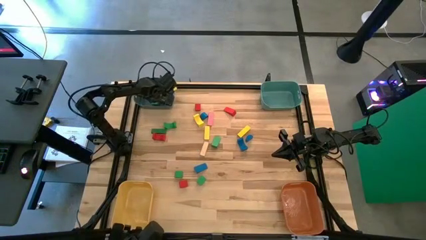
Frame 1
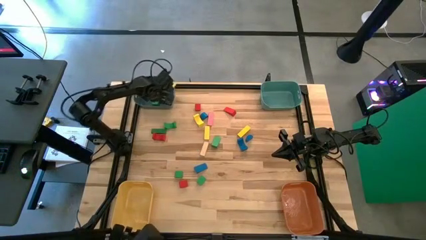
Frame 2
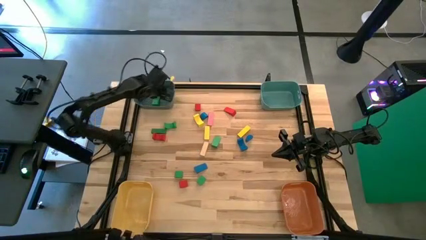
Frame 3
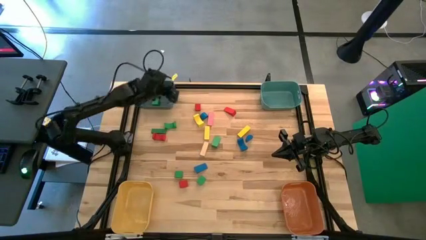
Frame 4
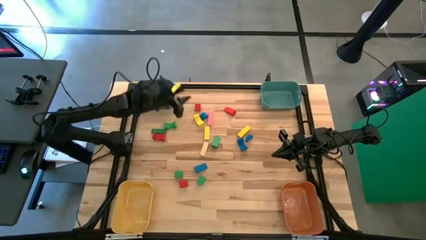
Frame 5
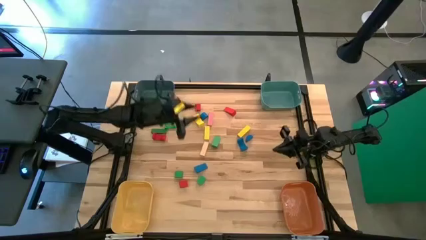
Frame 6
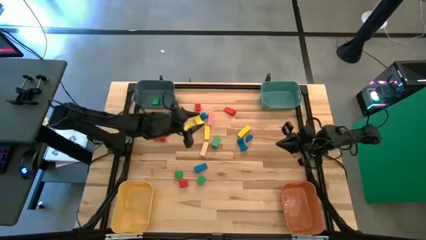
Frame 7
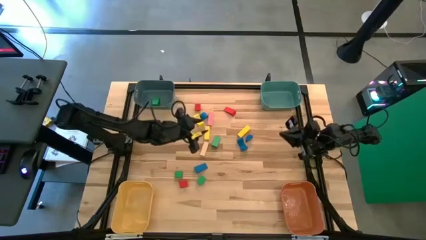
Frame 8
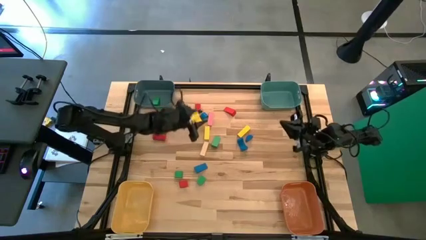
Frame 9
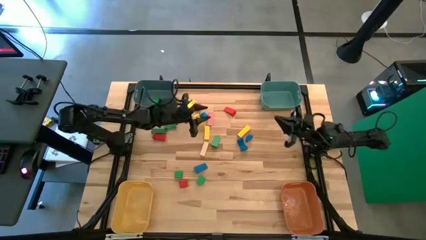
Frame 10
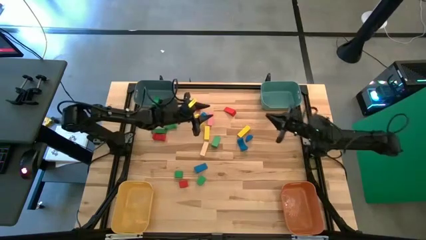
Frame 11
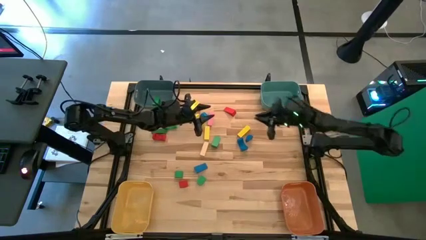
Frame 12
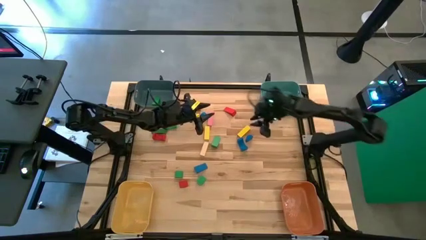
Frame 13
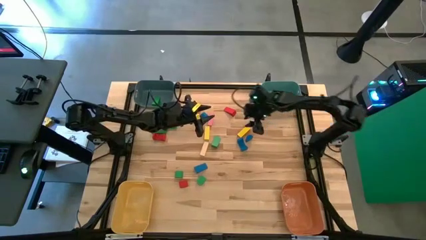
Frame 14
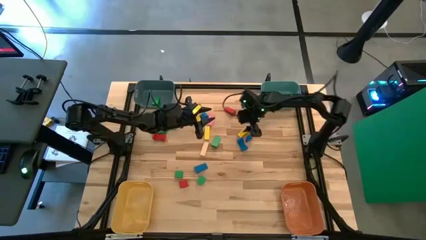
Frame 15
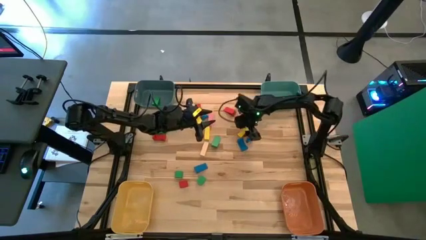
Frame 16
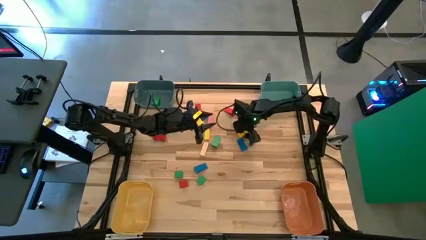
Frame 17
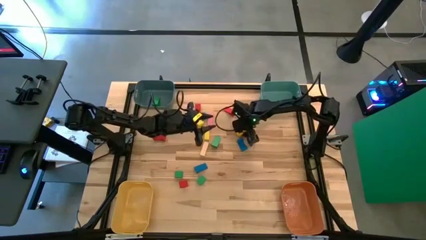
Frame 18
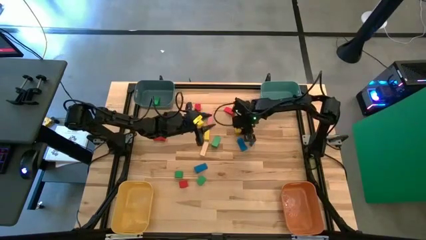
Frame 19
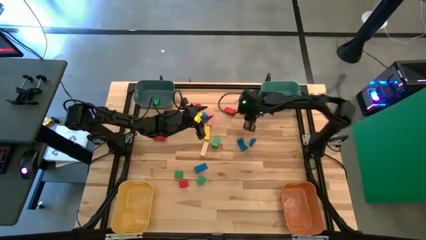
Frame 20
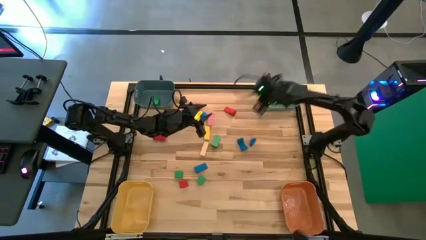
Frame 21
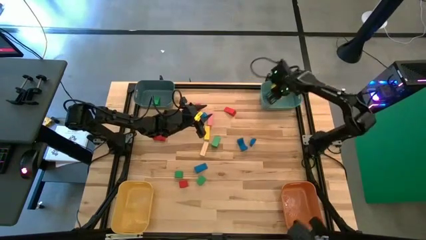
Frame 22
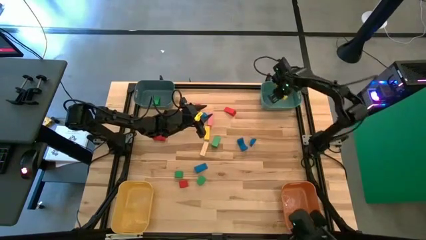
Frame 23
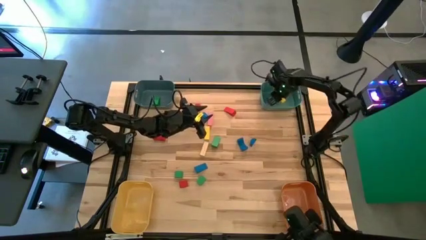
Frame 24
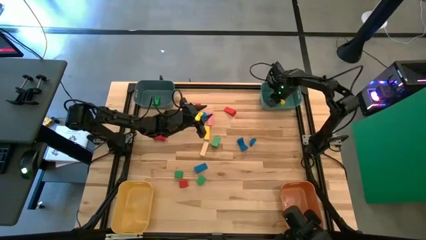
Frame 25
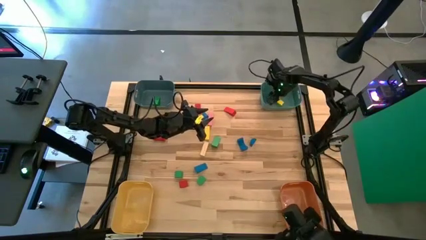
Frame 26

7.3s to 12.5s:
Task: Sort blocks by size
Put the right yellow rectangular block into the green bin

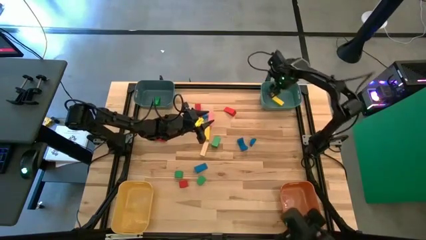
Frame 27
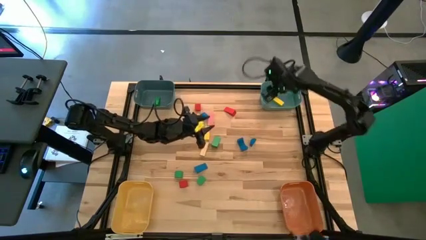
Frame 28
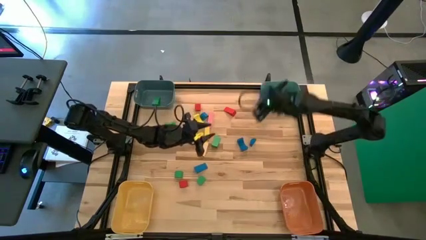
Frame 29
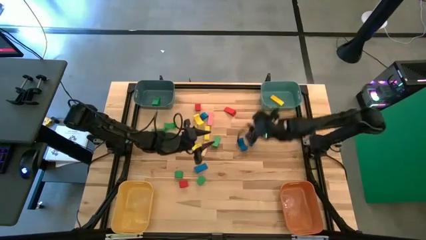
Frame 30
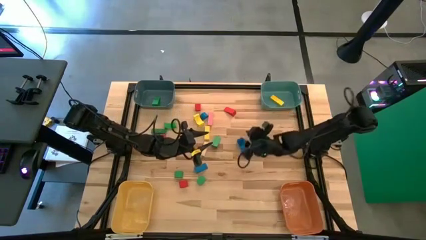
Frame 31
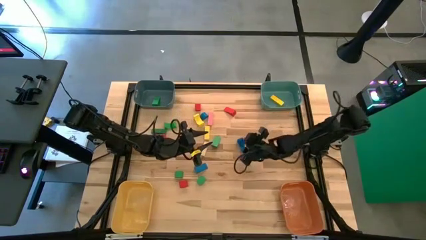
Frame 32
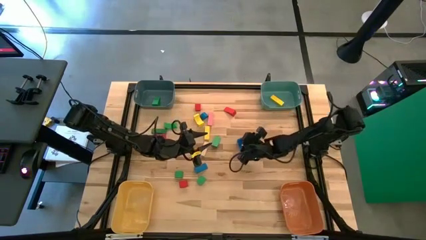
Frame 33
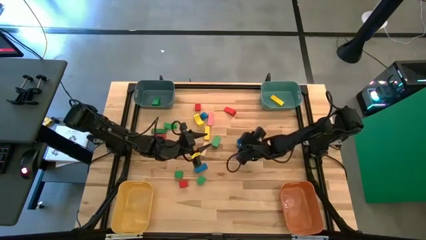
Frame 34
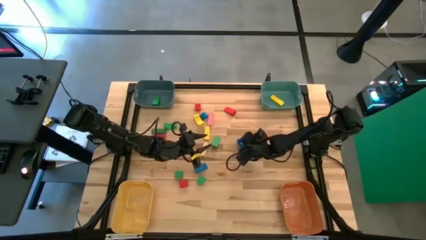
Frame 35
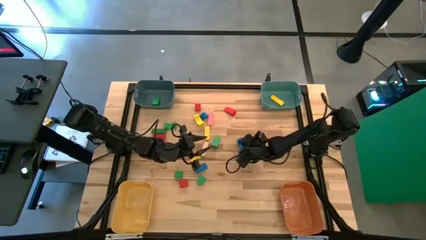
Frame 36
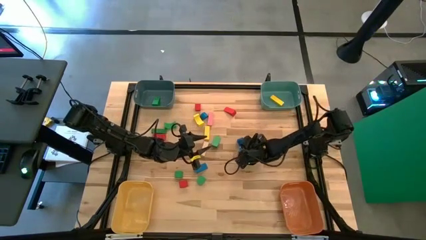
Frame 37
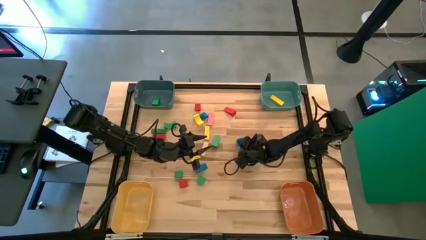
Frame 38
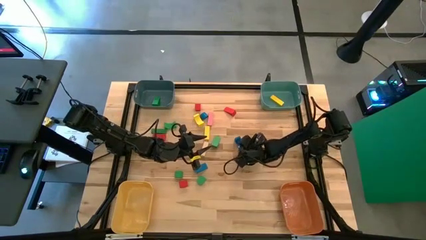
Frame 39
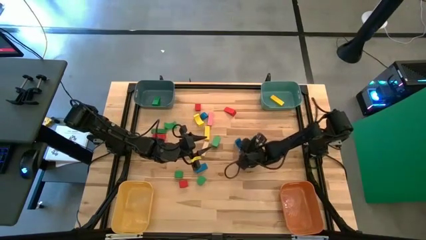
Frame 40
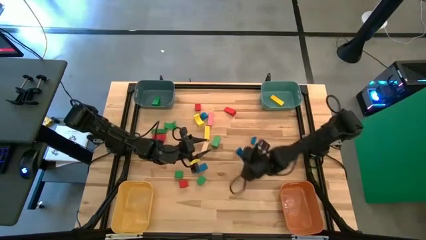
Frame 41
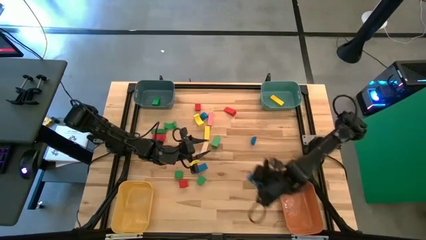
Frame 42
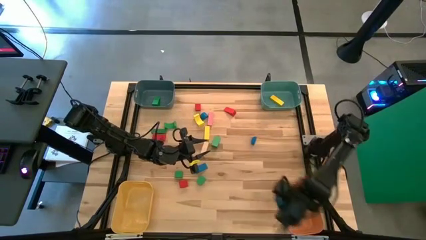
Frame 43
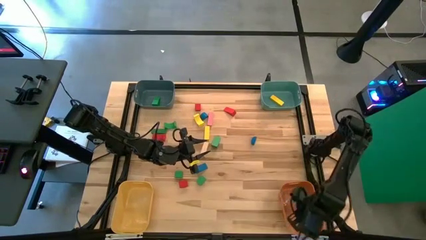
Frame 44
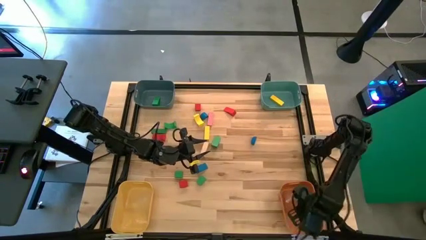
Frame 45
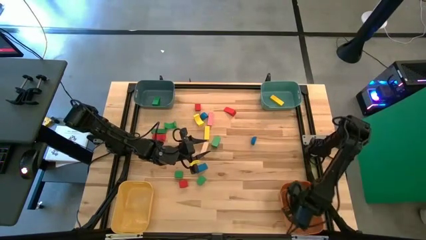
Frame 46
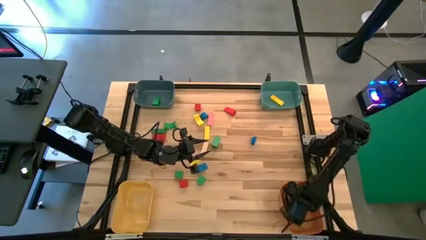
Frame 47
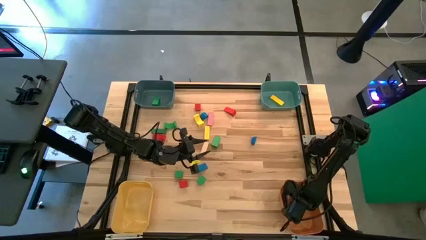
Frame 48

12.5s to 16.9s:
Put the blue arch block into the orange bin

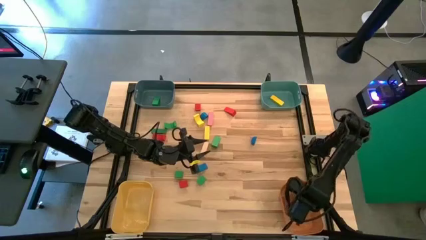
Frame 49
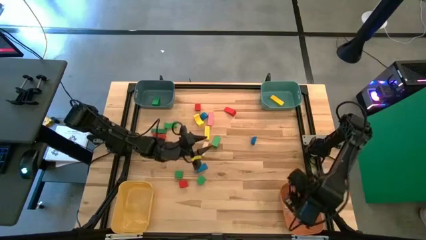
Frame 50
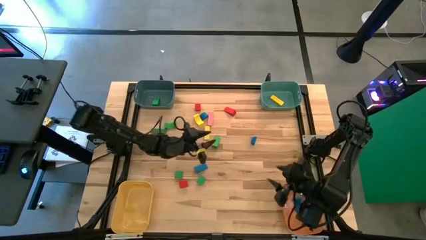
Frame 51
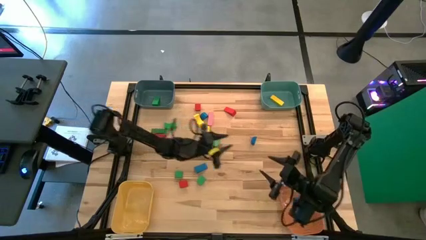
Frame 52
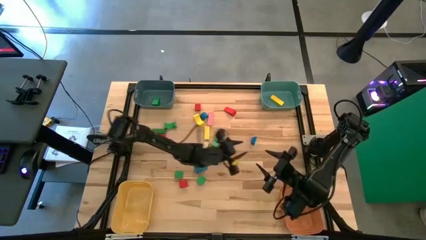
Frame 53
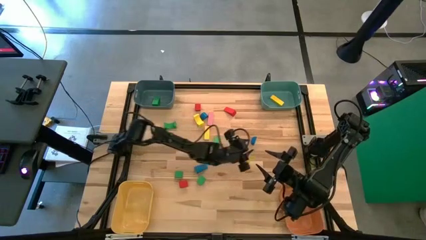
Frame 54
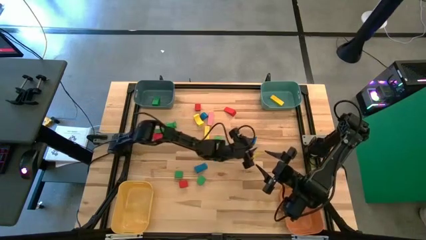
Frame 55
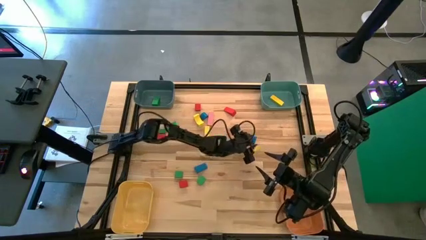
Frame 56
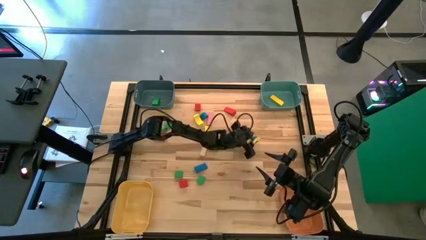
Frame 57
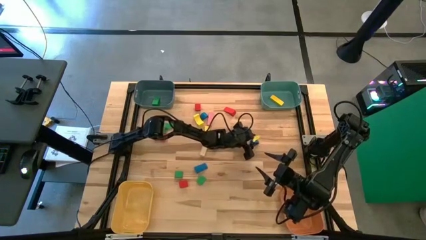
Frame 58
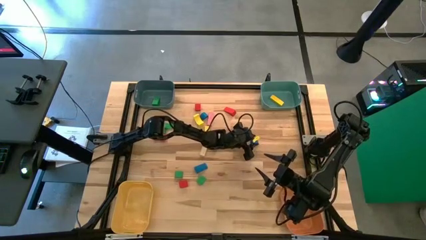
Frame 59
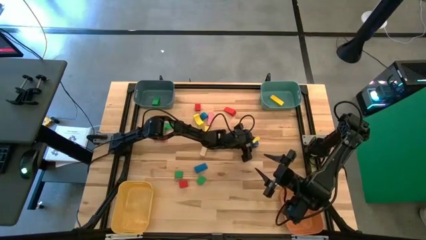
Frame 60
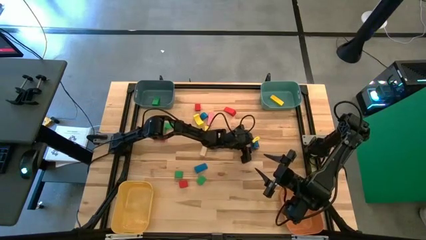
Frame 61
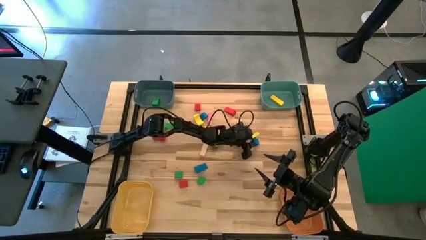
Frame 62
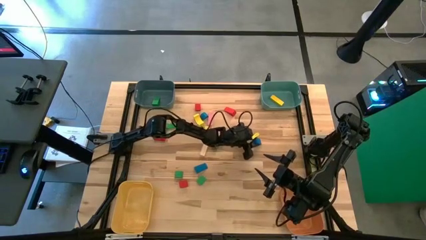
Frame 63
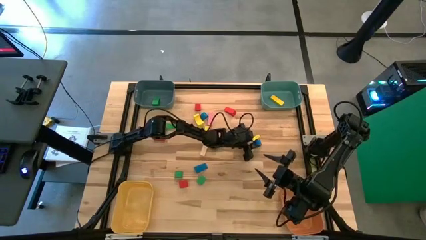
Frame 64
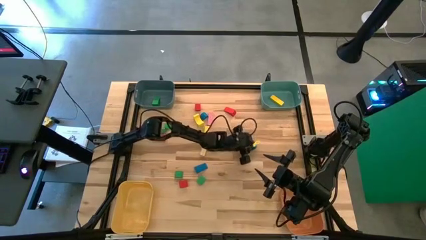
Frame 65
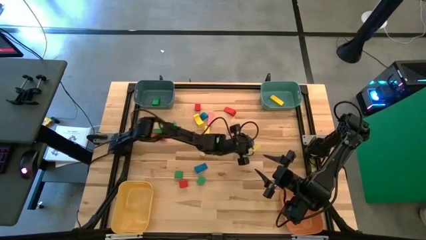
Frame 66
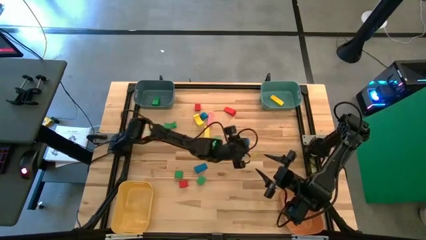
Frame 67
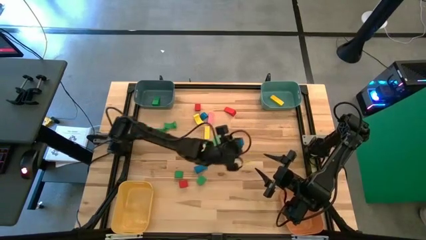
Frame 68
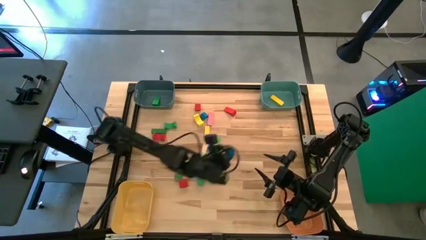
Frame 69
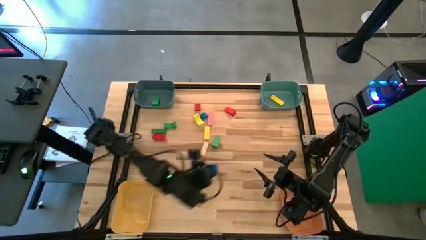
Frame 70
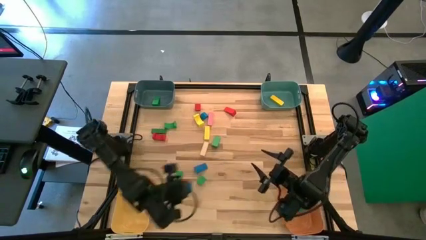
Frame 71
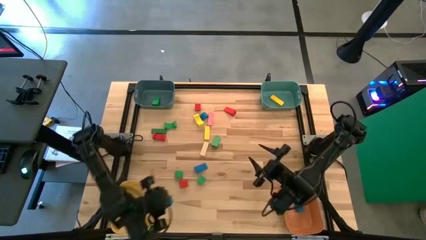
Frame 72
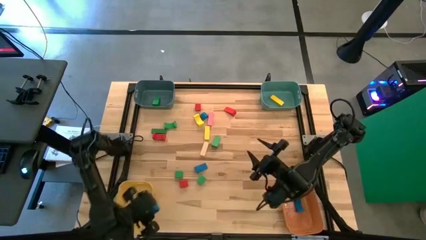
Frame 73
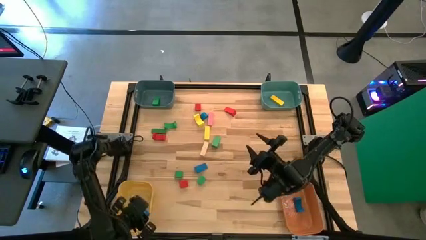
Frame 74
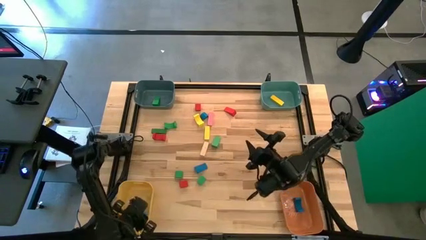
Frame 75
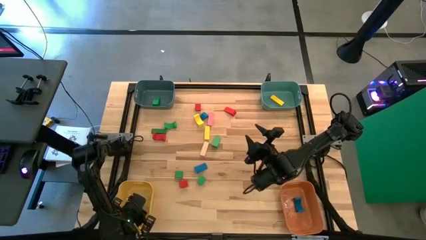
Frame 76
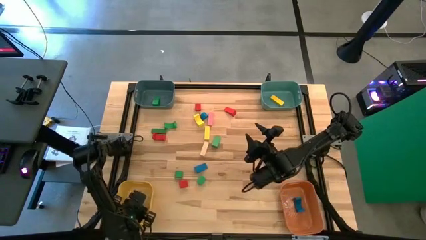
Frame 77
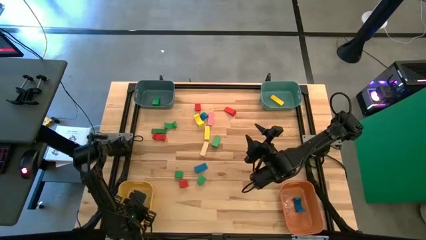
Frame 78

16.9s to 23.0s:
Put the bottom blue half-circle block into the yellow bin

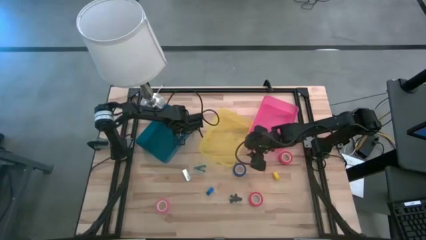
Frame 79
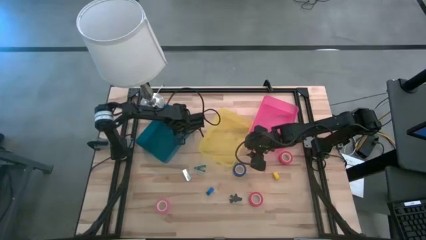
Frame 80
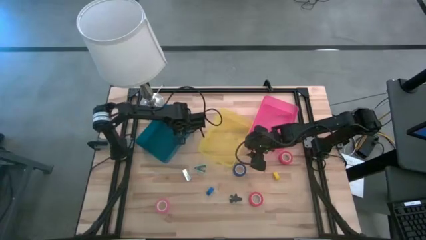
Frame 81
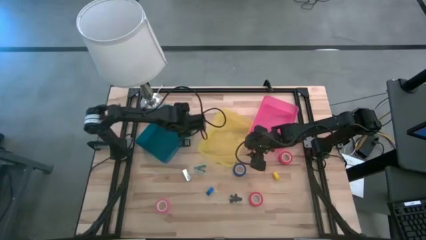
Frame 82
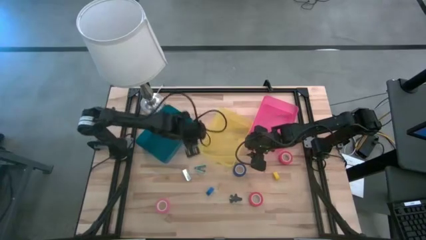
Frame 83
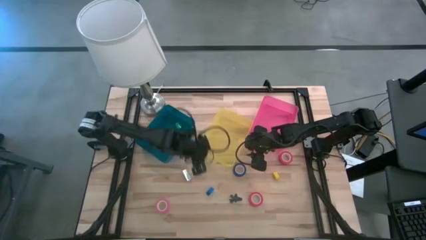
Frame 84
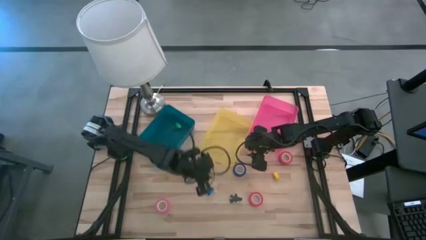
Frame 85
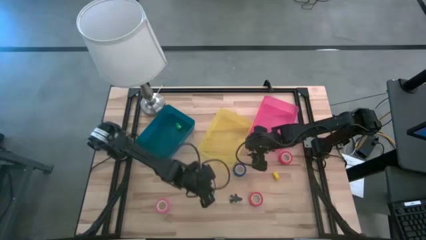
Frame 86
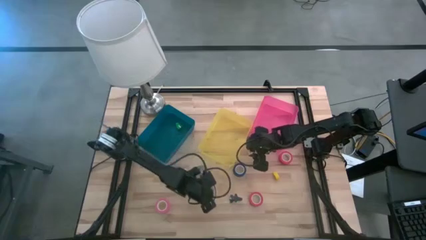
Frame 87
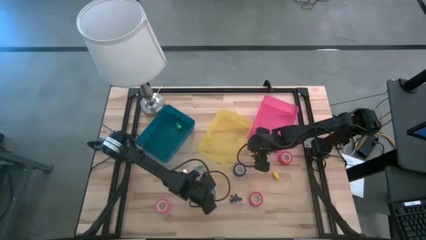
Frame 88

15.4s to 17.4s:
Task: Pick and place Stapler, Stapler remover, tape
Put the blue stapler into the blue bin
